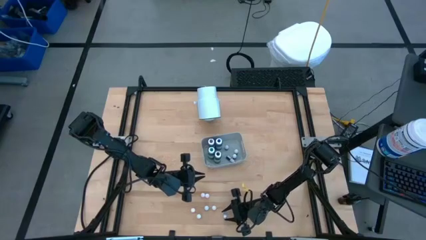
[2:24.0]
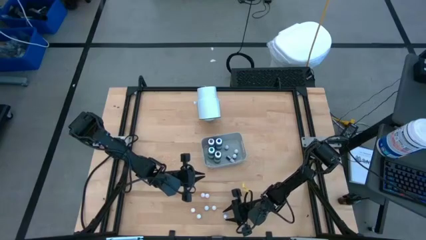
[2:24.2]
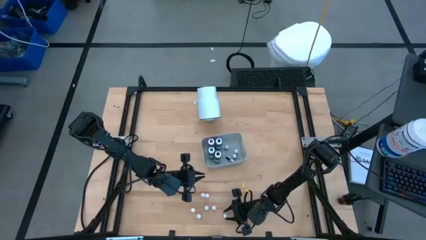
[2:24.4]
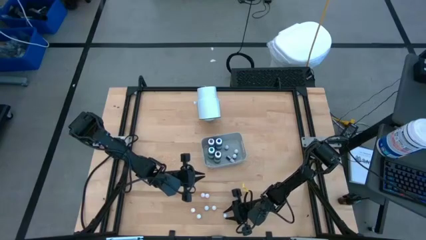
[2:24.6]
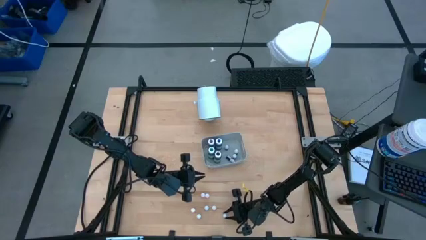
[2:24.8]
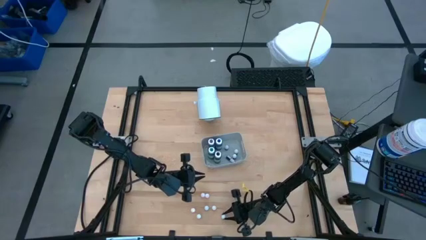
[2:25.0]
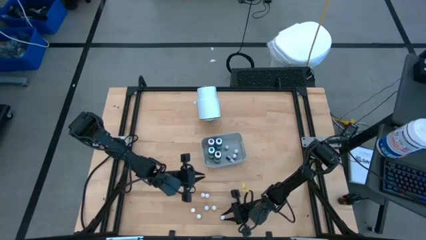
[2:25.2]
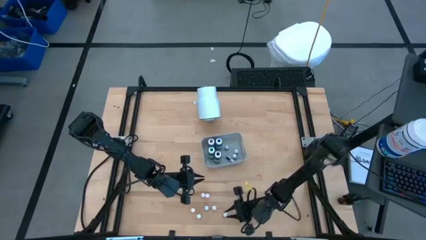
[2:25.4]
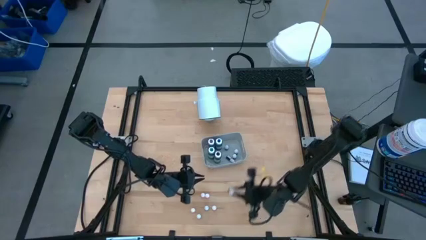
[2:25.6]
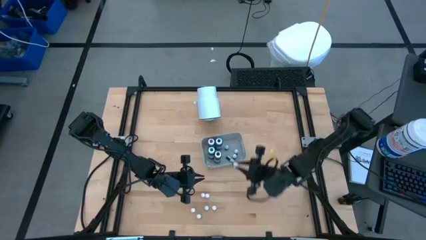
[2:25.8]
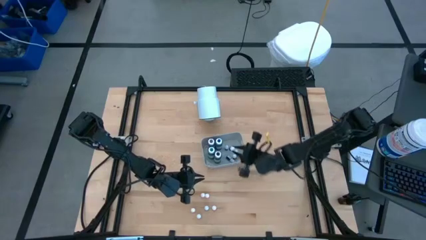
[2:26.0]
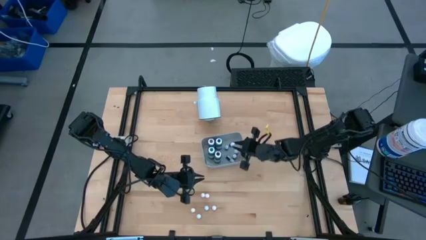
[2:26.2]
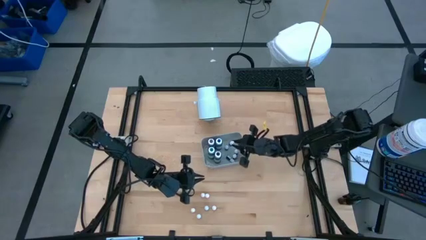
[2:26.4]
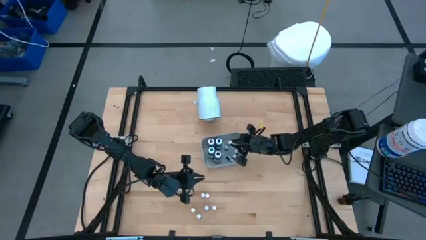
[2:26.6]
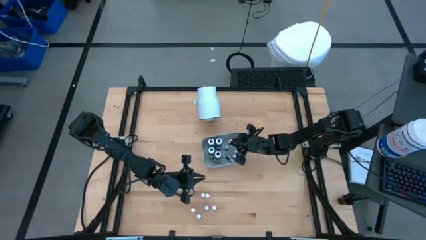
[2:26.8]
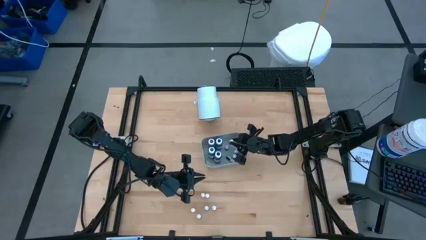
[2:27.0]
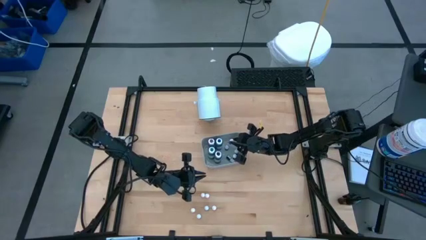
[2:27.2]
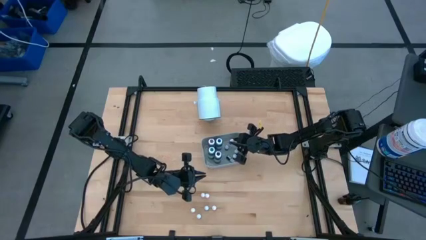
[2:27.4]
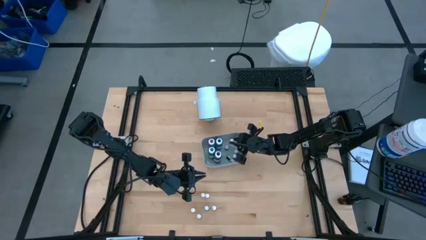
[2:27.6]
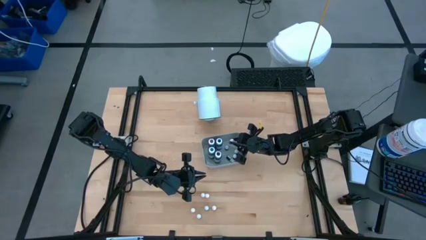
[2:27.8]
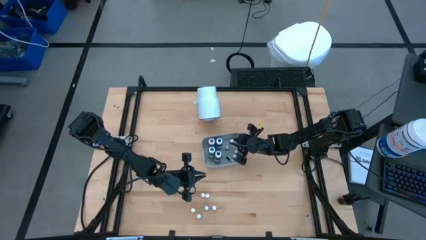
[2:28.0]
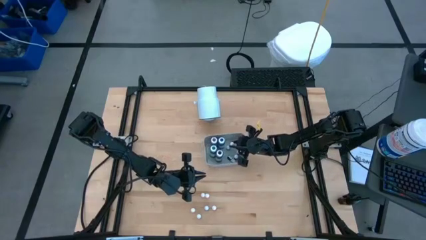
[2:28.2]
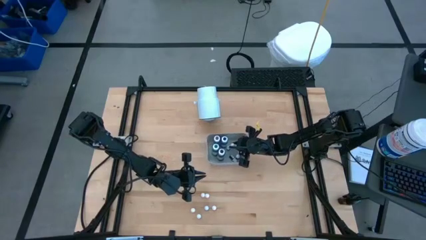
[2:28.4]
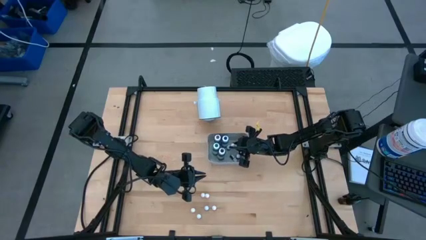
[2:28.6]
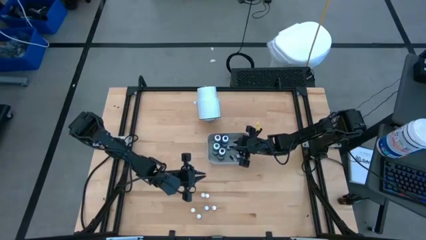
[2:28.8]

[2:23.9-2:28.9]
Task: Pick & Place food coloring
Put the purple food coloring bottle into the gray bin

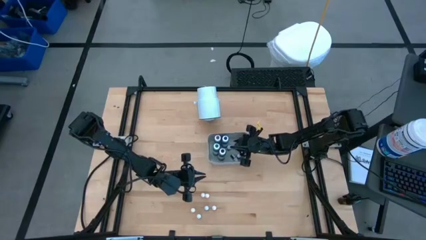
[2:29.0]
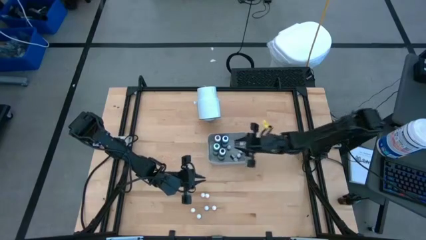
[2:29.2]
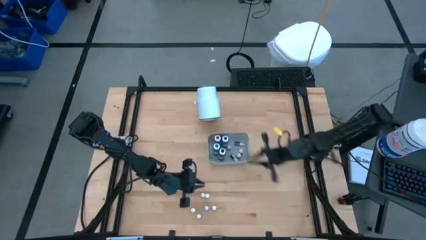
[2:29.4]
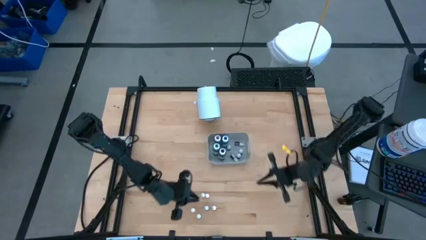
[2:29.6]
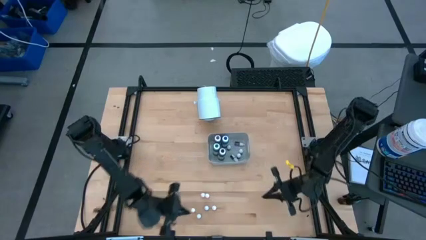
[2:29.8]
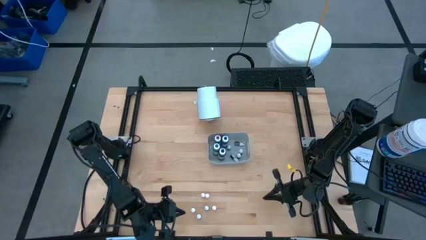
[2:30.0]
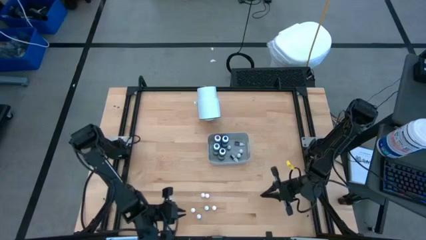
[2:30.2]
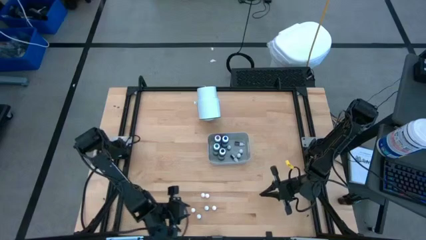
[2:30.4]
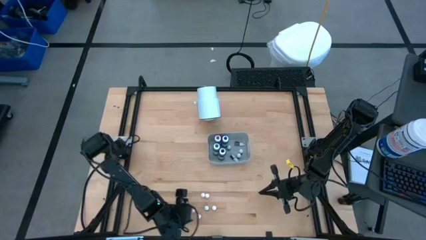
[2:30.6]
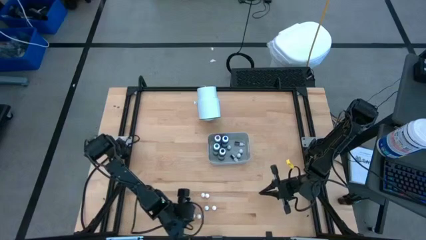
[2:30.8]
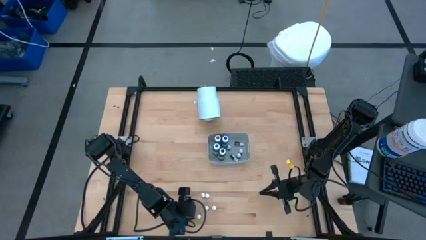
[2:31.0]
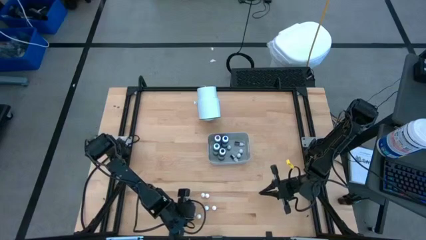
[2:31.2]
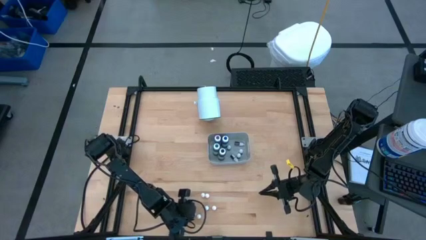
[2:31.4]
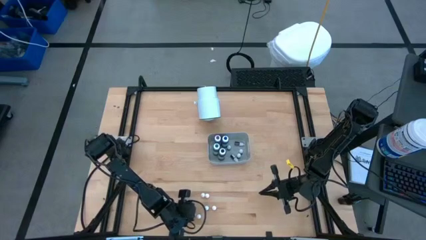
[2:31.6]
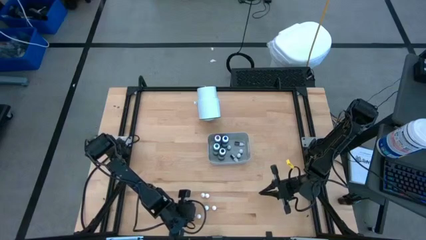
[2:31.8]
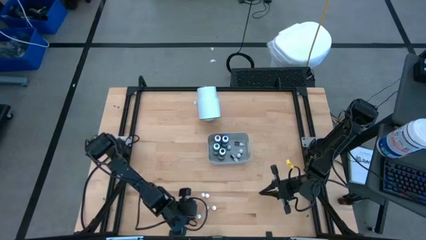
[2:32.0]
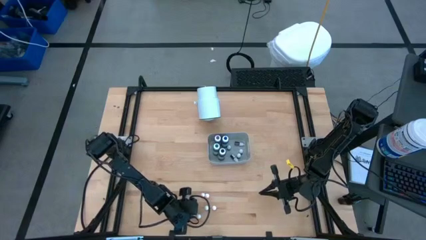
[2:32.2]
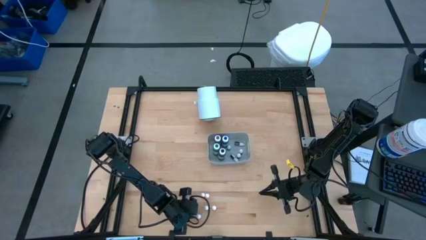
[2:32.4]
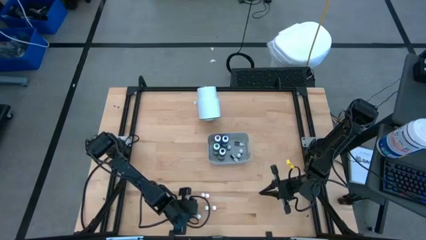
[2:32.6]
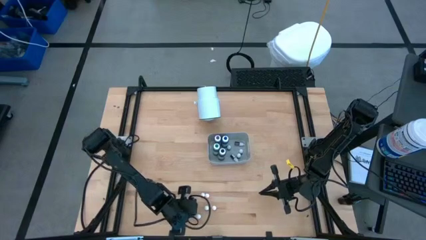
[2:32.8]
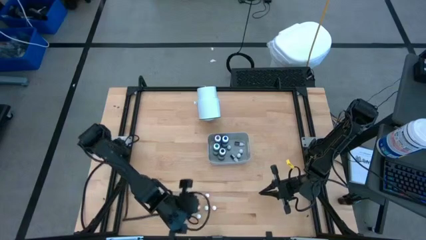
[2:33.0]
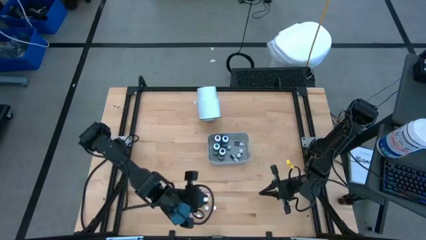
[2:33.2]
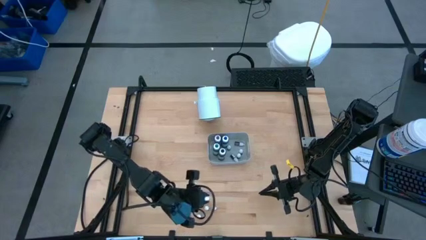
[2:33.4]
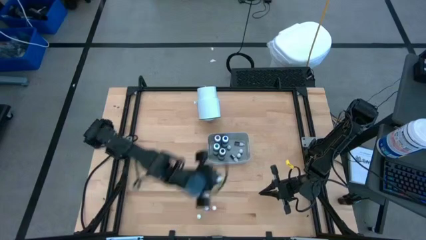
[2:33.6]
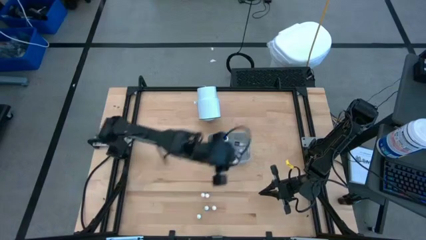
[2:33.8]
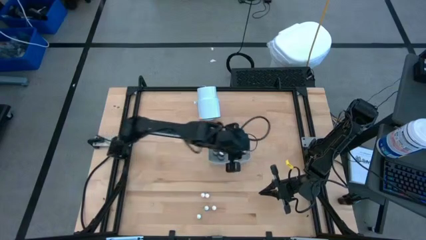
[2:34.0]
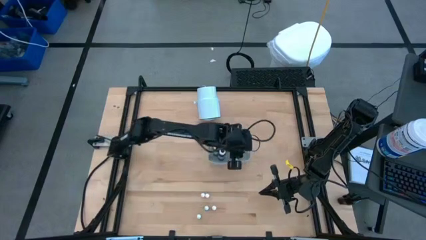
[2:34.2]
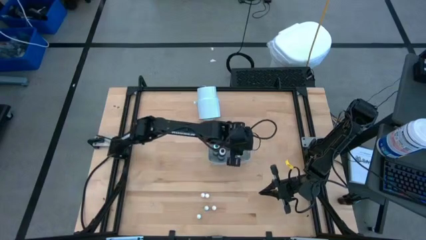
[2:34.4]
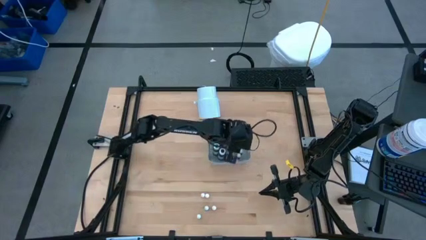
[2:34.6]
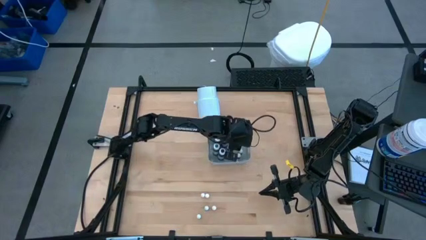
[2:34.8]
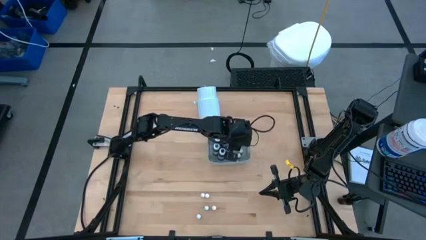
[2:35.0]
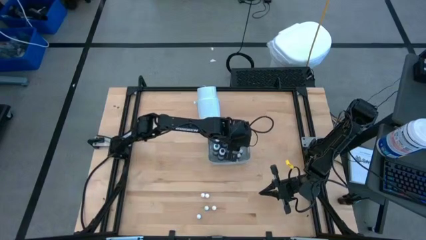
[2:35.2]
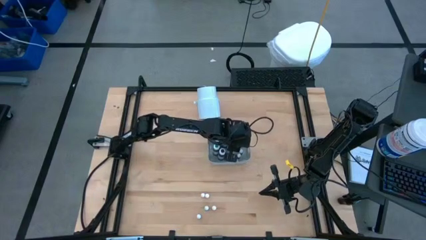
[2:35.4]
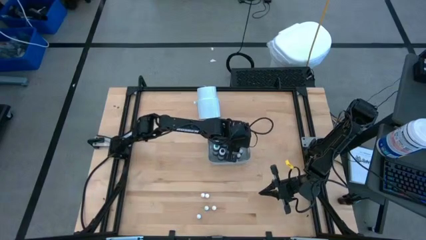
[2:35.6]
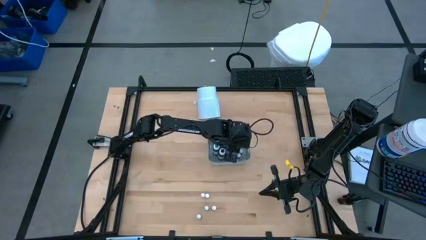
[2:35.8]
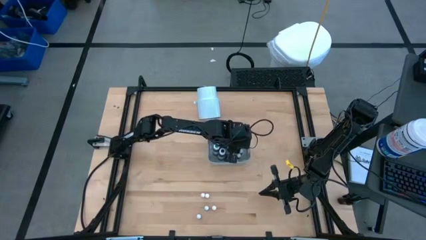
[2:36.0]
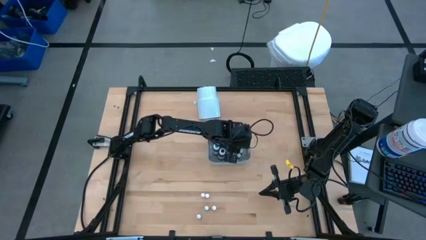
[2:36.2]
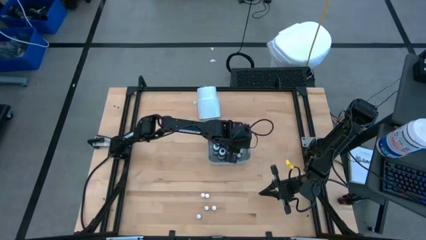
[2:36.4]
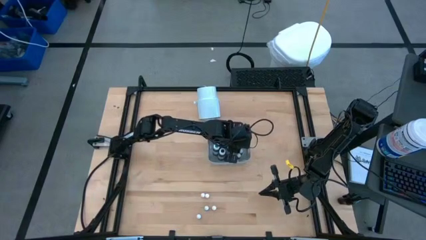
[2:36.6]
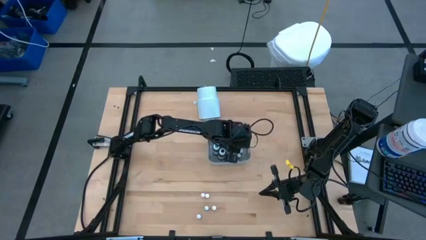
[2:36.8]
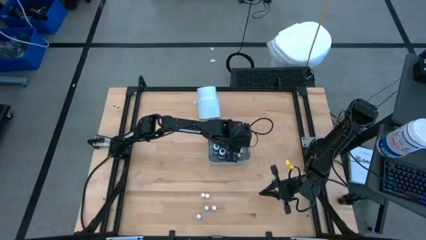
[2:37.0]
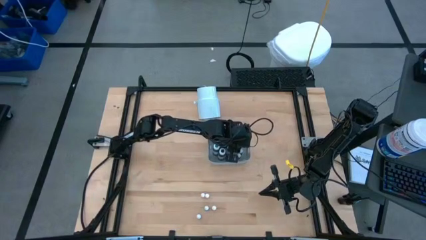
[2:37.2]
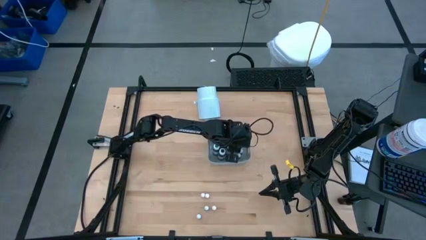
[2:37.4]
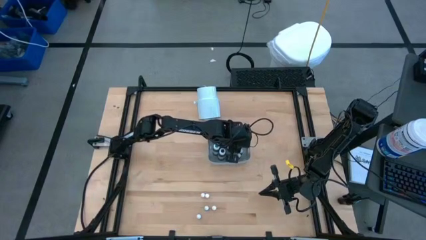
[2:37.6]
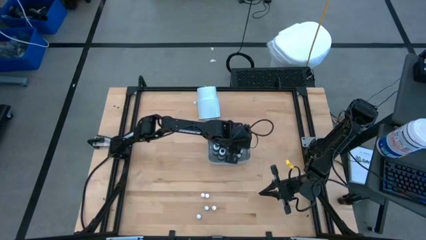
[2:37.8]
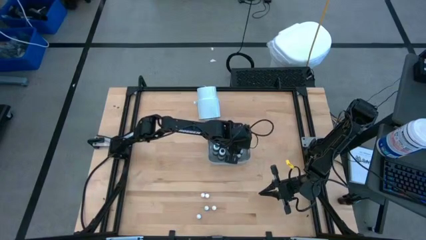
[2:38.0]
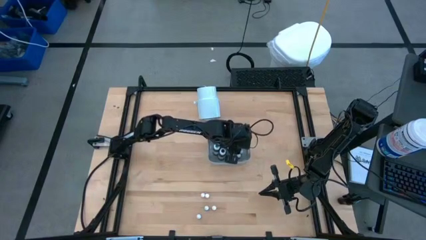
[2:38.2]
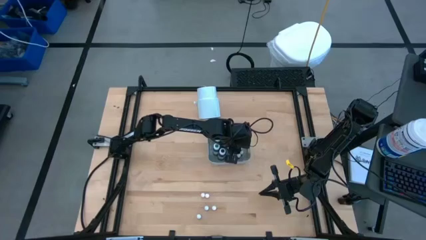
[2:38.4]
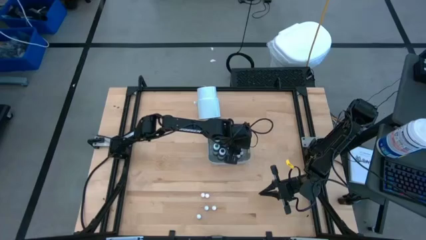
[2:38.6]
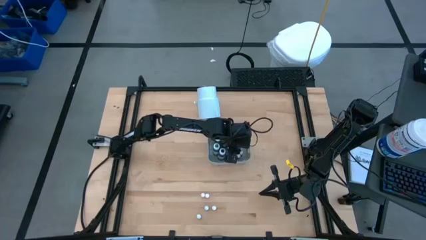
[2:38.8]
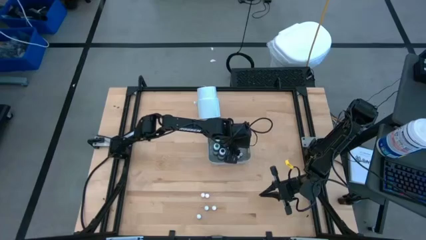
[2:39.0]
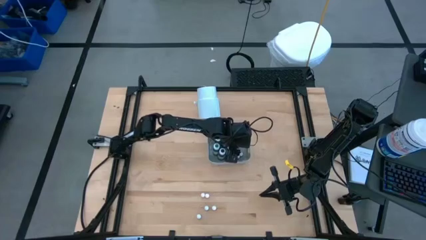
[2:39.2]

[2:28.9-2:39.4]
Put the orange food coloring bottle into the gray bin

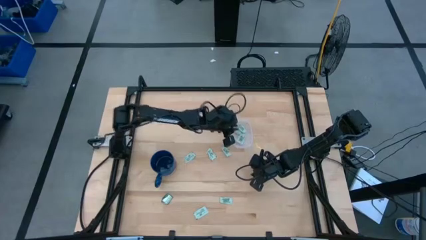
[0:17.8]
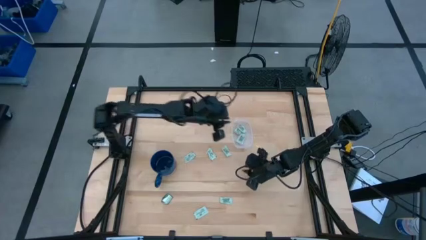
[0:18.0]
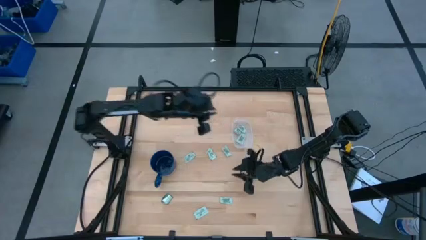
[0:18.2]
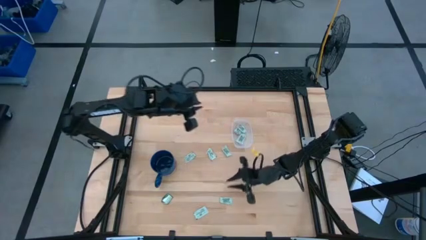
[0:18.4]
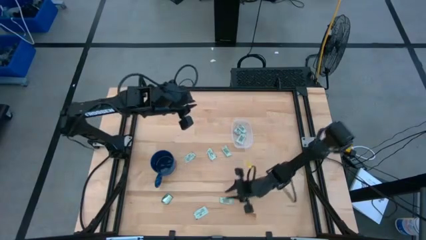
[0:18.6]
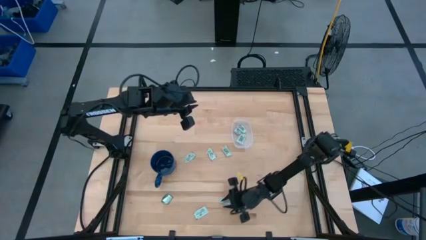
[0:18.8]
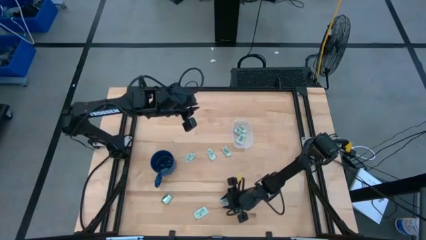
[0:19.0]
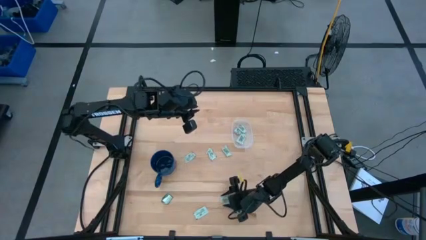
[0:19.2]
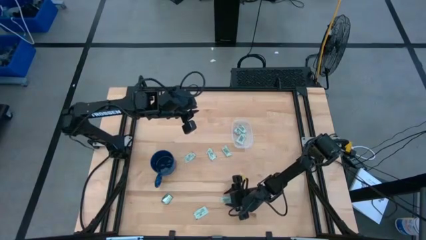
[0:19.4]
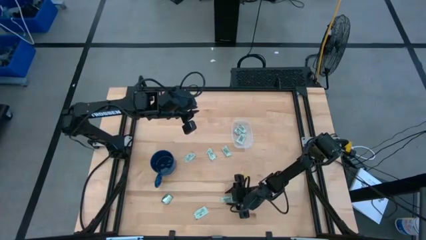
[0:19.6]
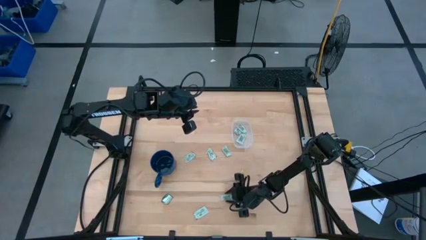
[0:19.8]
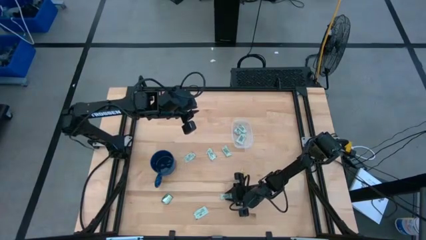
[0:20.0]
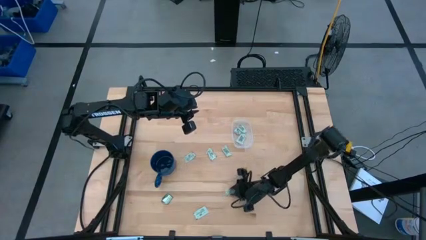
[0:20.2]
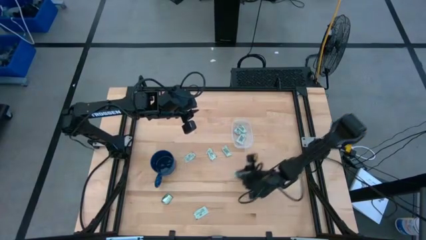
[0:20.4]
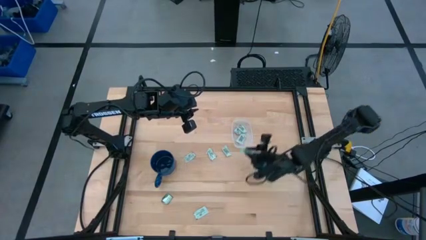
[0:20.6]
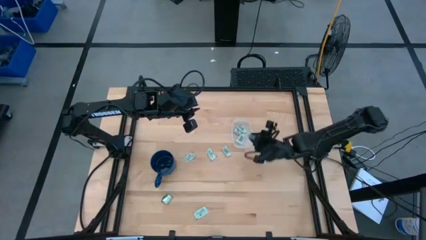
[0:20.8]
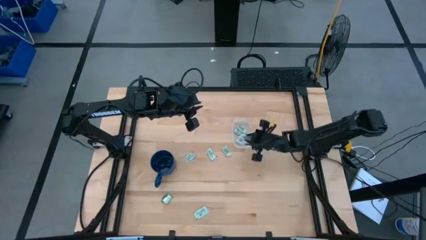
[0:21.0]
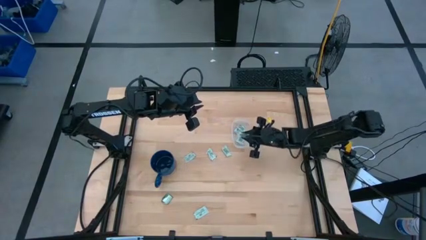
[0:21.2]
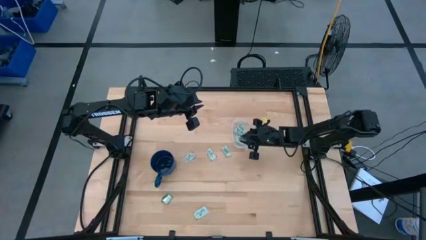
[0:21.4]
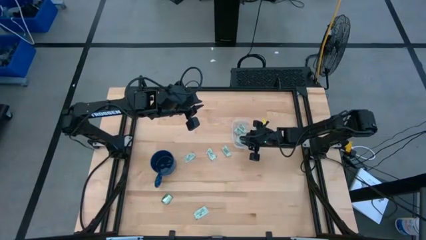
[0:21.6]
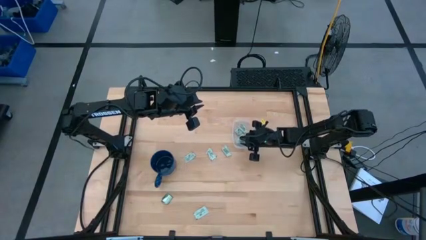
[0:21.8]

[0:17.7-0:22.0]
Task: Pick and place Stevia / Truvia into bins
Put the light green stevia packet into the transparent container
